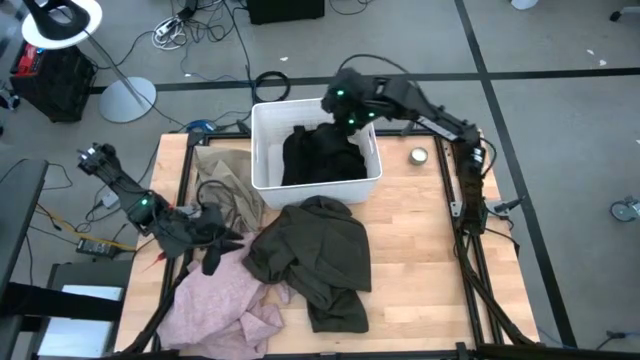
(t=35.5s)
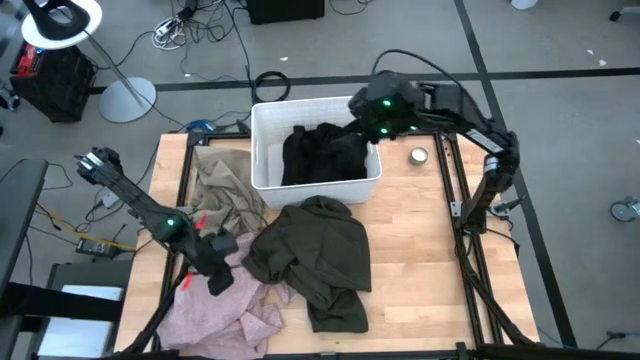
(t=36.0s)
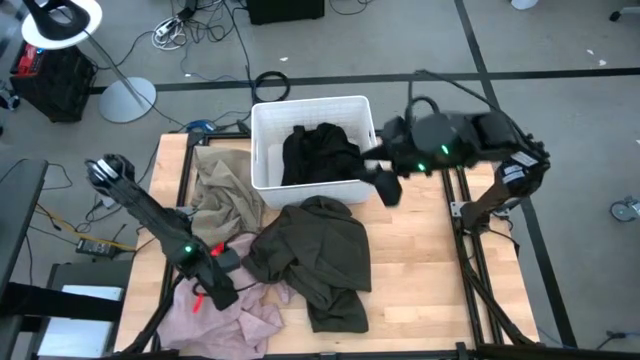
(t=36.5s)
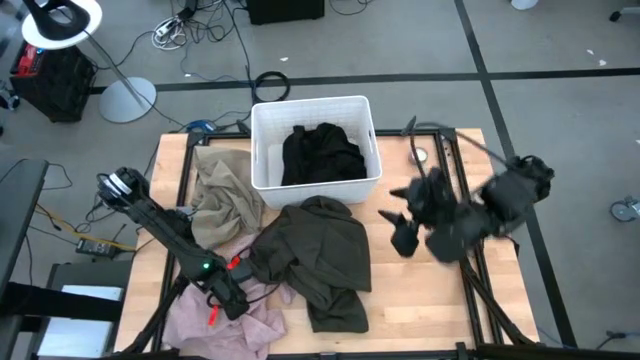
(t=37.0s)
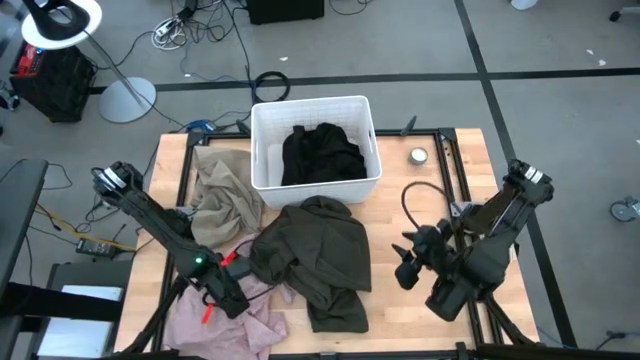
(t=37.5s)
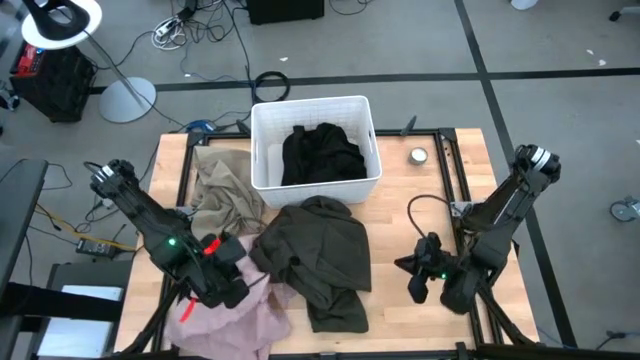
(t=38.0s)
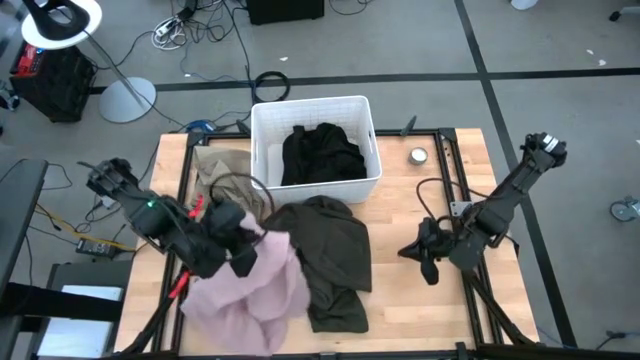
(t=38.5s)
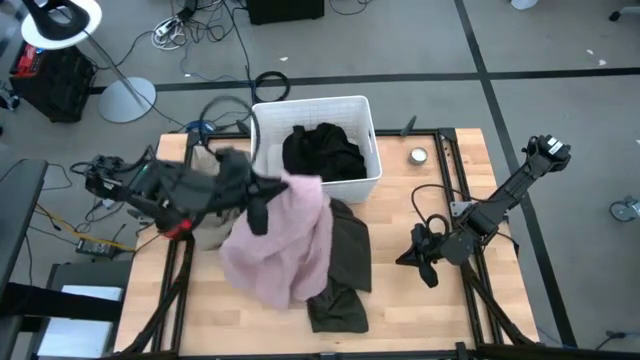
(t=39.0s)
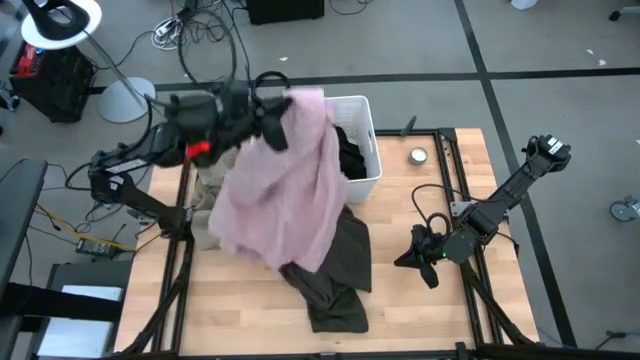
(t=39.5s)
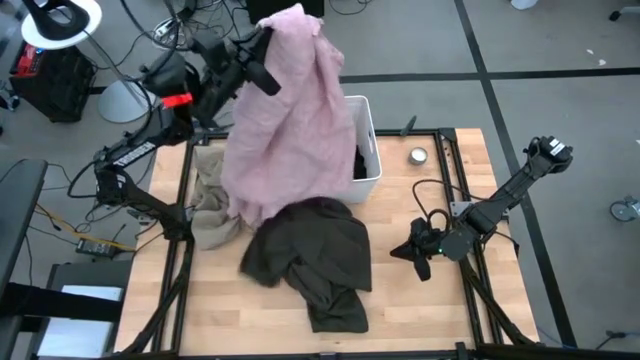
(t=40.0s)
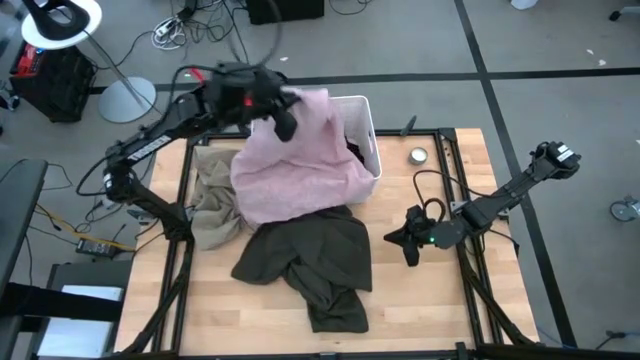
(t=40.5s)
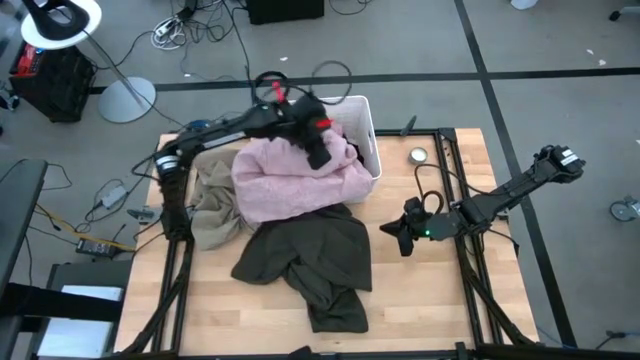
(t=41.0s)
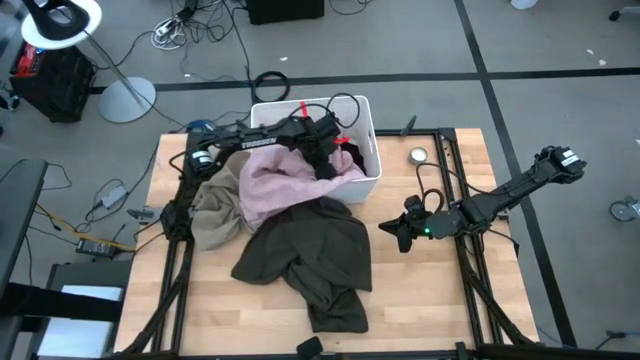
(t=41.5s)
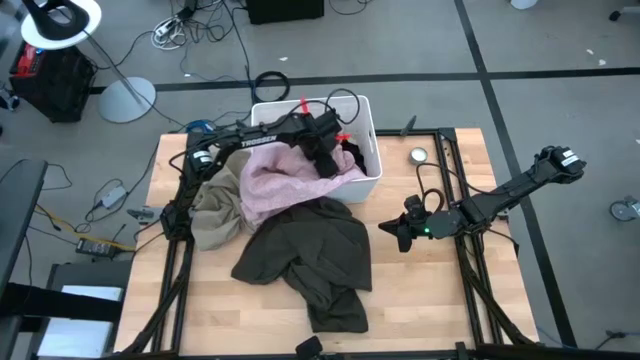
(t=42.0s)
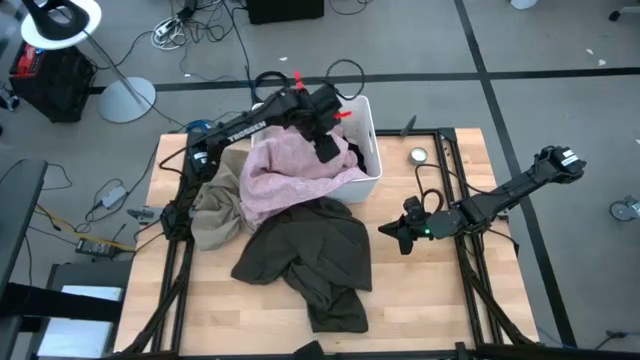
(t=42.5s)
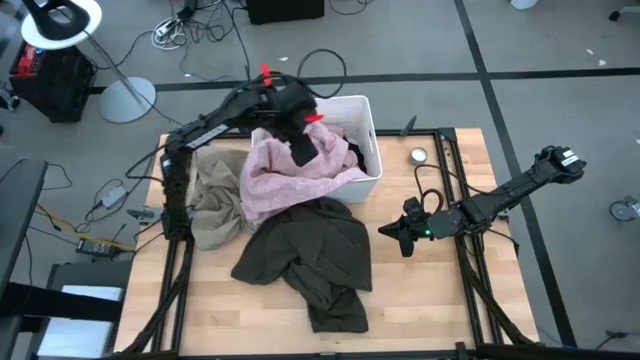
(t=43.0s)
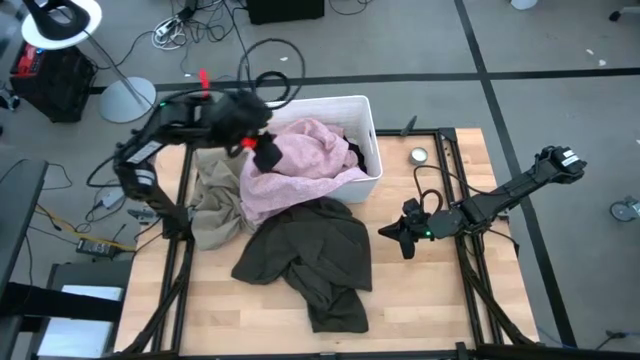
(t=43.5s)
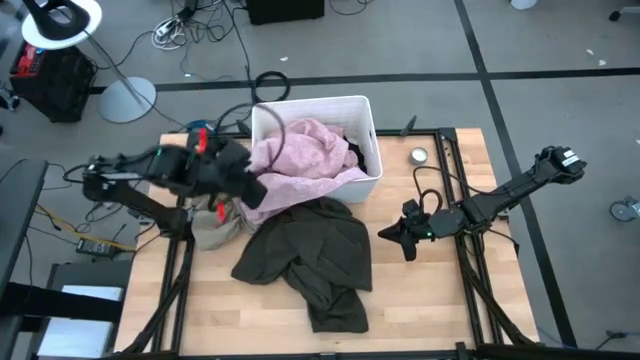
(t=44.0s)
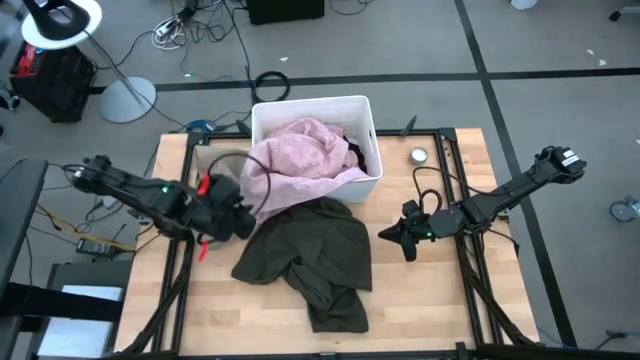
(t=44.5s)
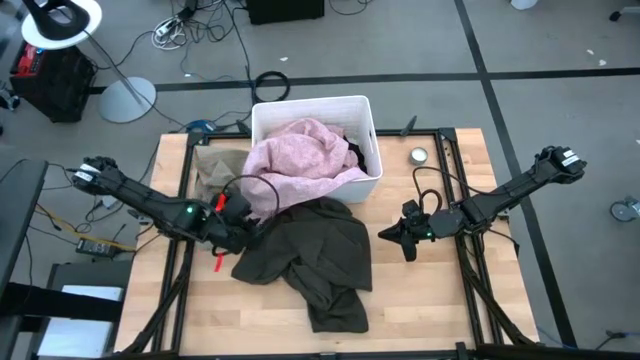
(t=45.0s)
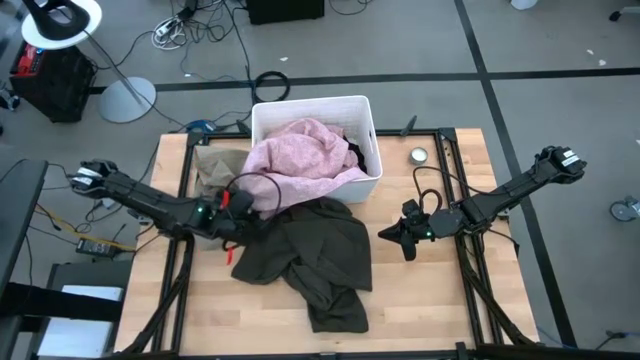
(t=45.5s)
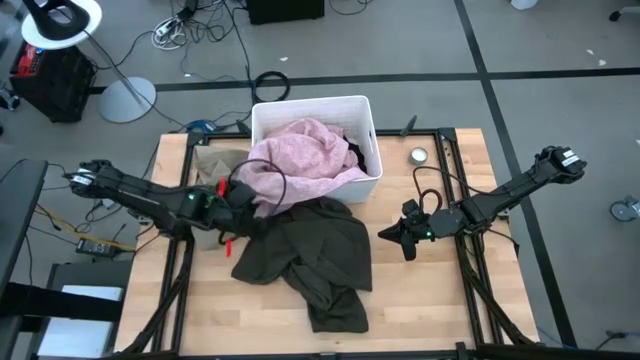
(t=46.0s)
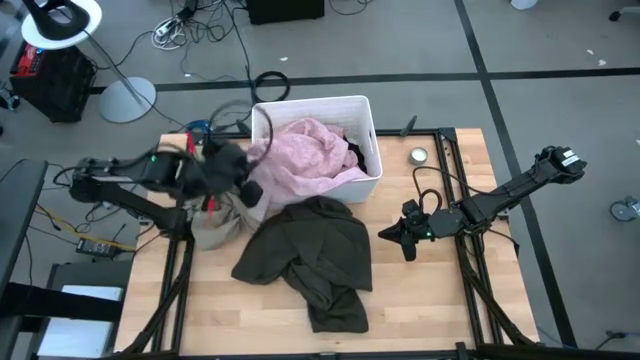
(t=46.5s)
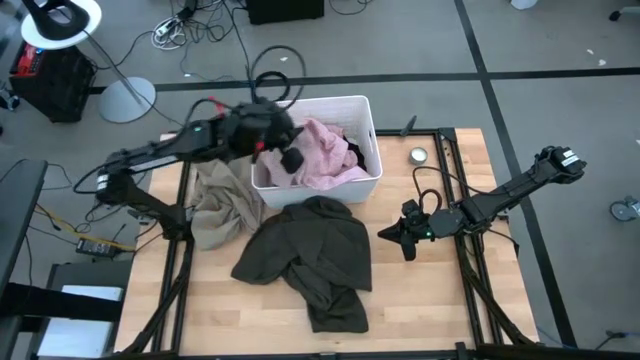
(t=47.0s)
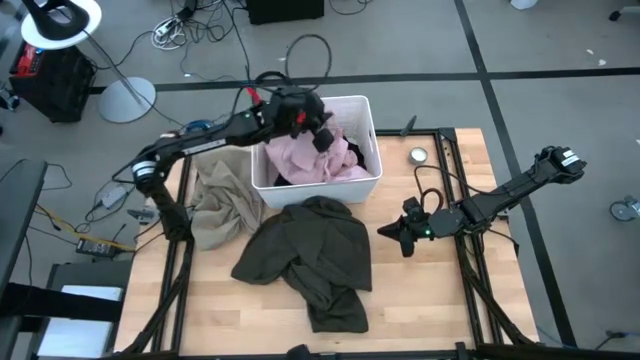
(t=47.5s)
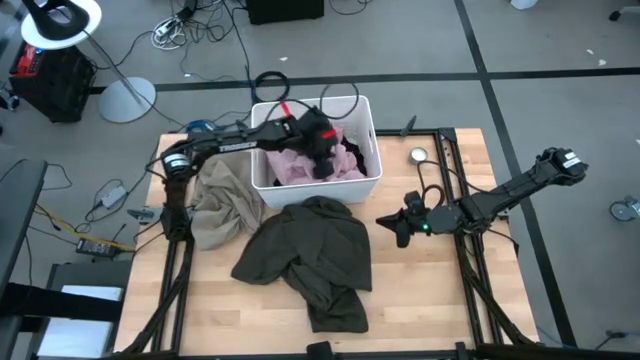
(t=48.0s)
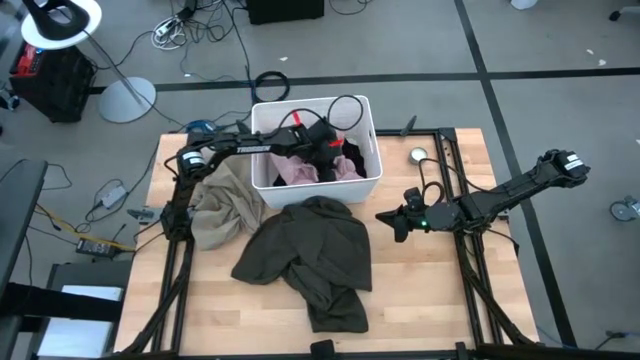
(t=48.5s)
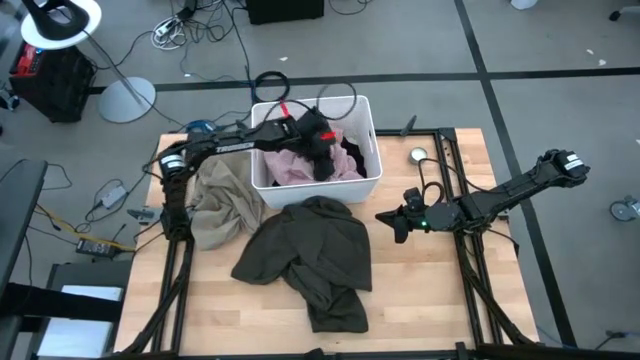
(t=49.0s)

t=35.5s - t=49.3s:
Task: Sort clothes
Put the pink shirt into the white laundry bin

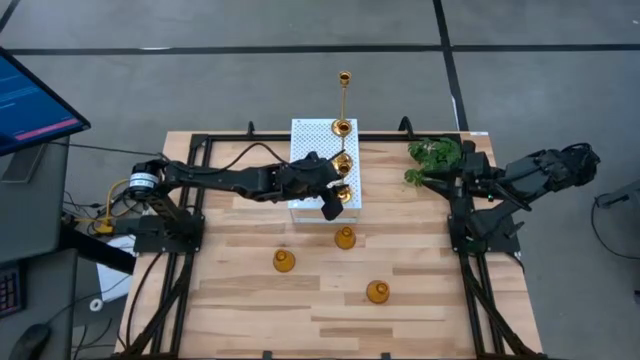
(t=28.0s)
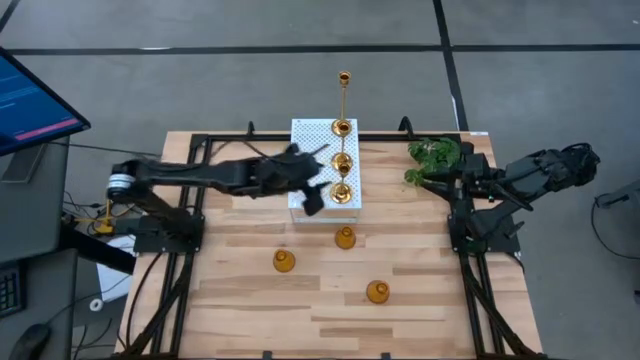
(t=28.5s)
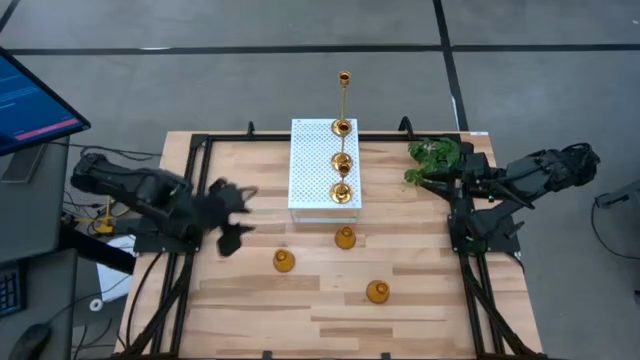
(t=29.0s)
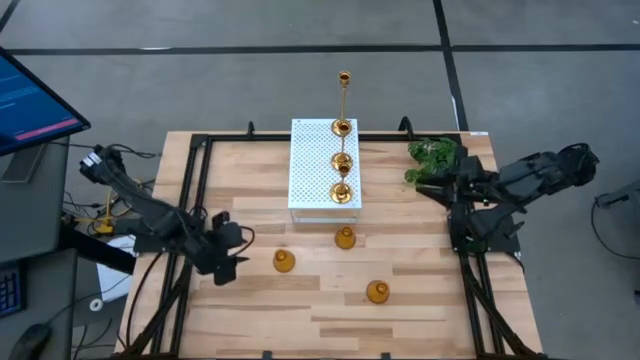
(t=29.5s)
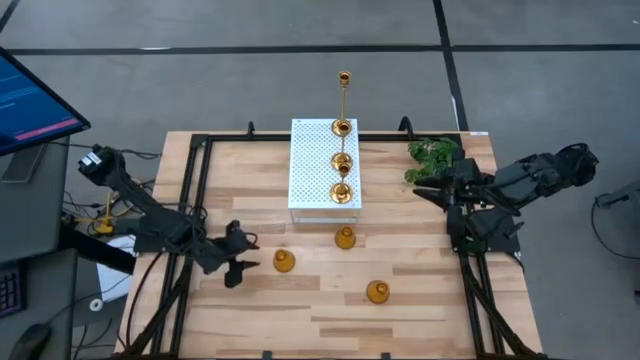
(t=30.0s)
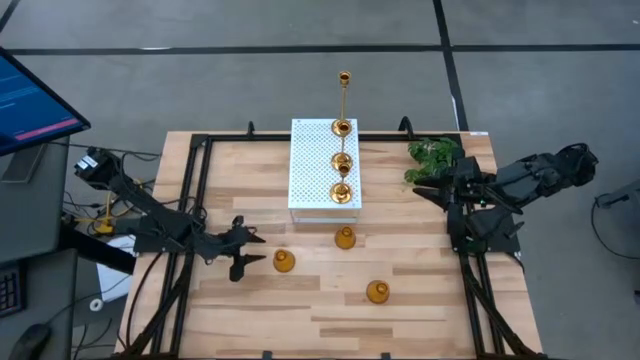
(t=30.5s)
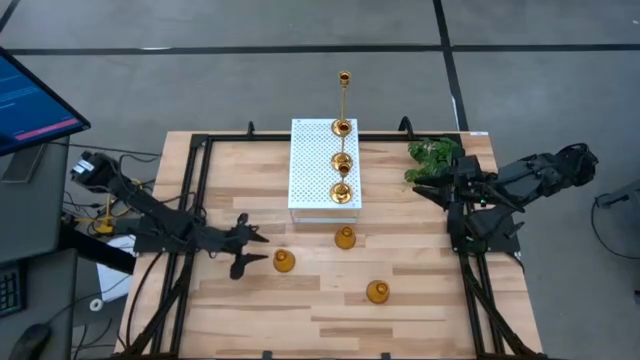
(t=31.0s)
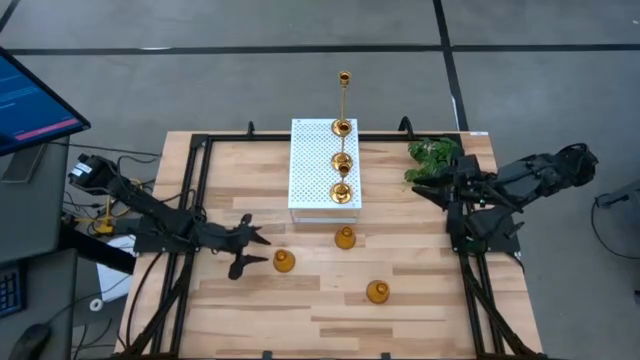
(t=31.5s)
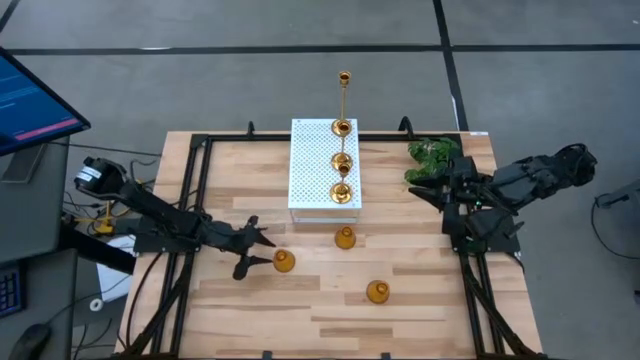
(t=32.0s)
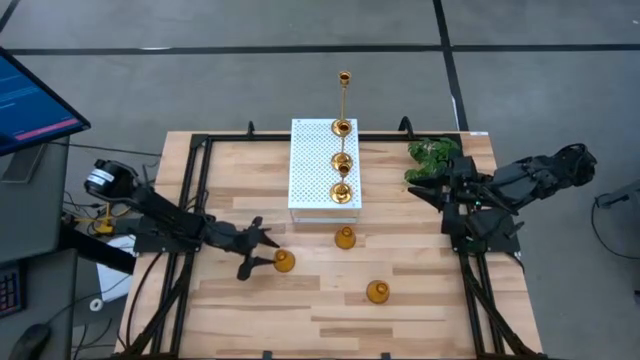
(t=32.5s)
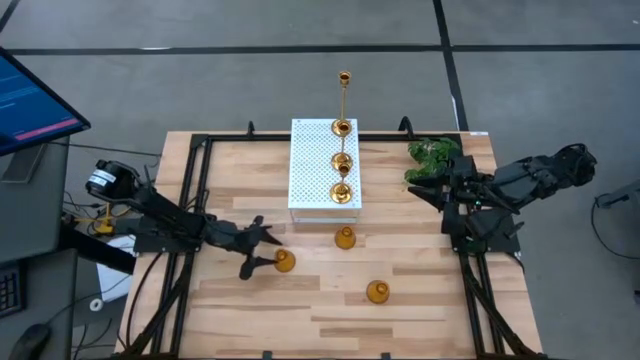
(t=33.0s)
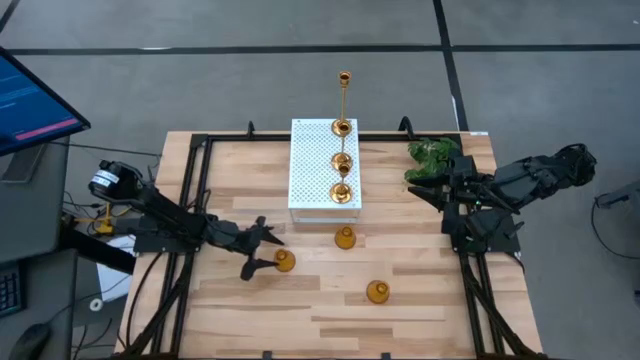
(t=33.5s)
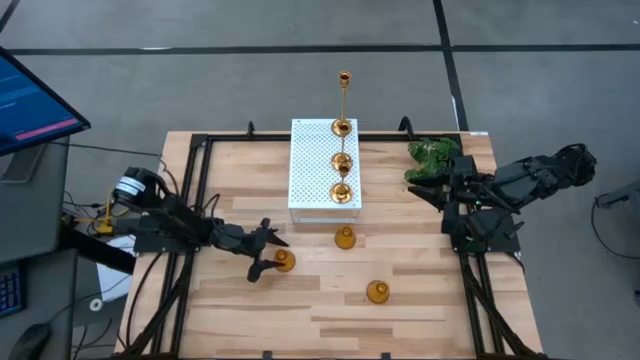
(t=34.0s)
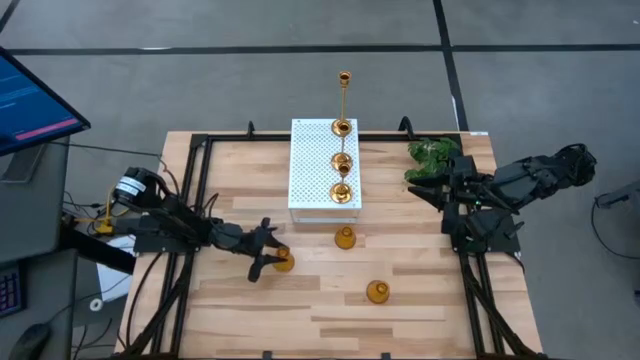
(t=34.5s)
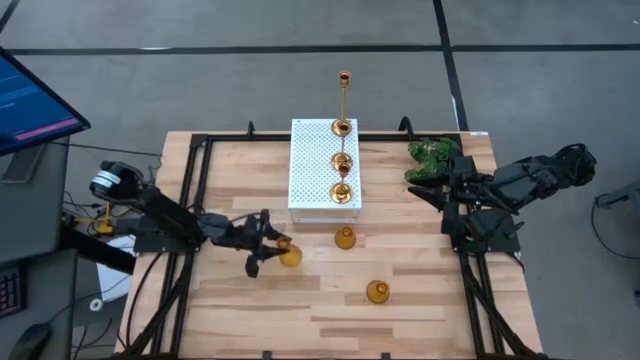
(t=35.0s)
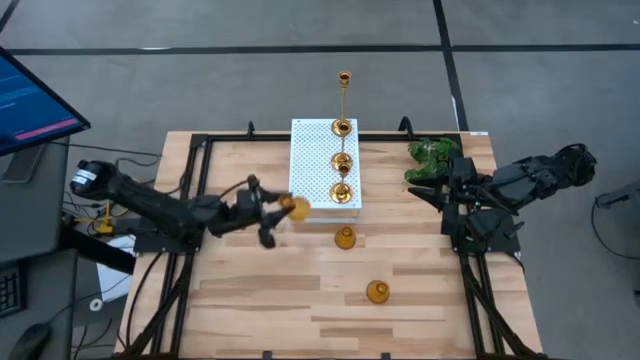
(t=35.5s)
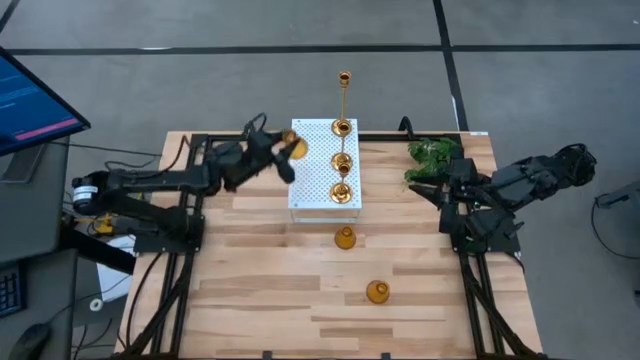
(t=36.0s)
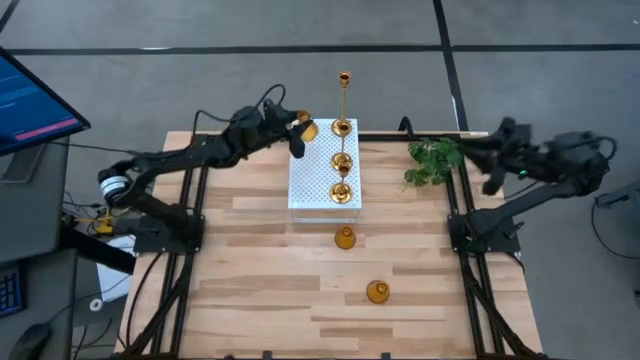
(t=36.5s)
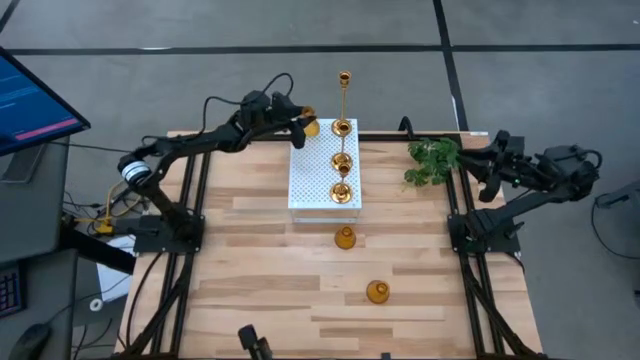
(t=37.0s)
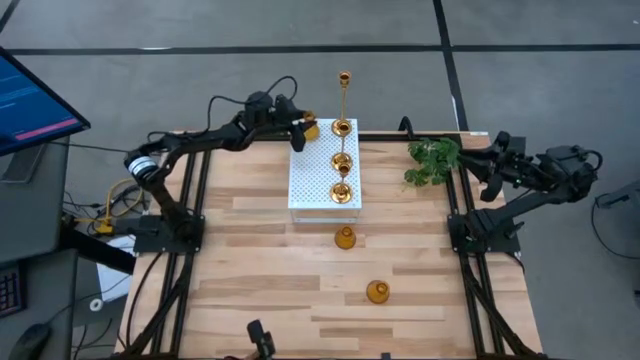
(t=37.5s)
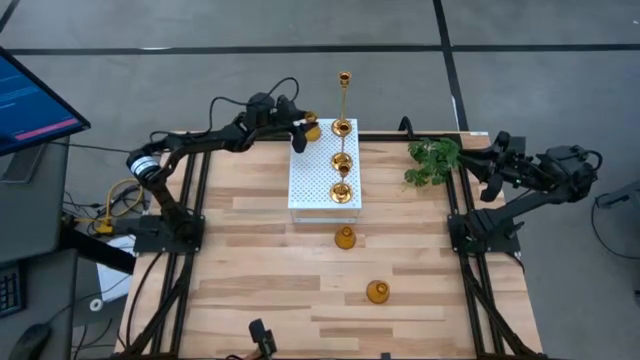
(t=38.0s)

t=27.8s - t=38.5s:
Task: Pick & Place candle stick holders
Put the left orange candle holder on the shelf
